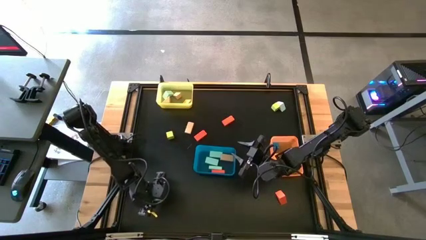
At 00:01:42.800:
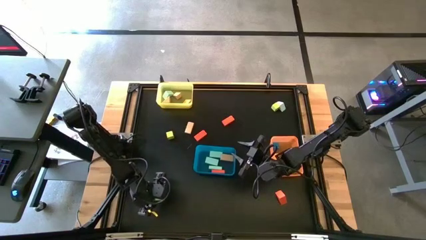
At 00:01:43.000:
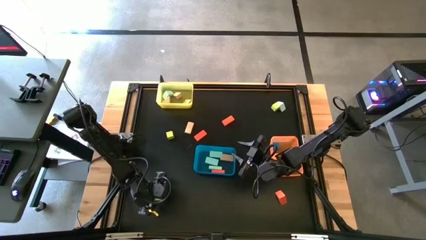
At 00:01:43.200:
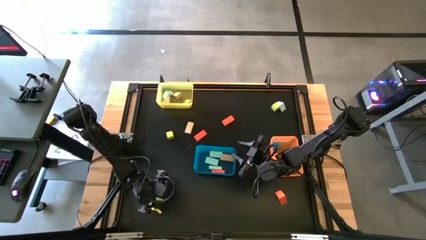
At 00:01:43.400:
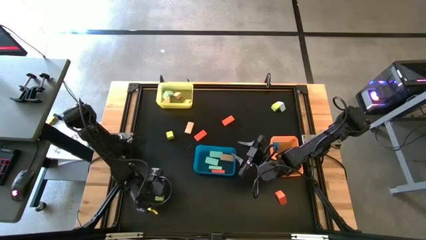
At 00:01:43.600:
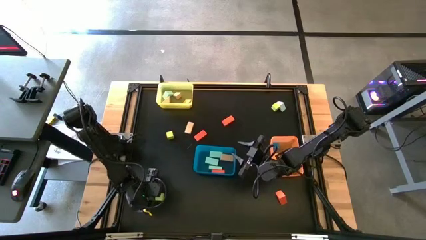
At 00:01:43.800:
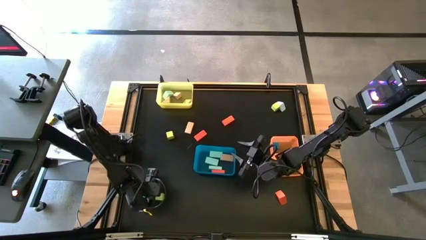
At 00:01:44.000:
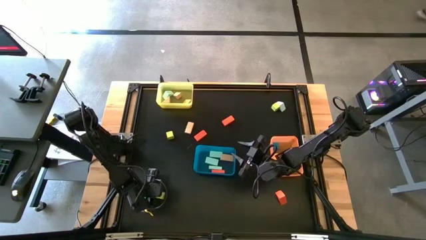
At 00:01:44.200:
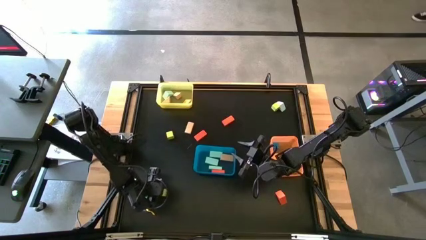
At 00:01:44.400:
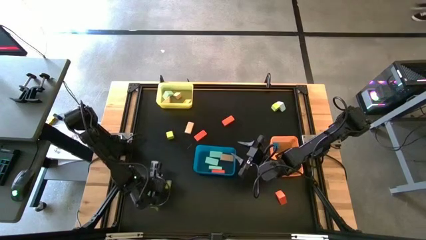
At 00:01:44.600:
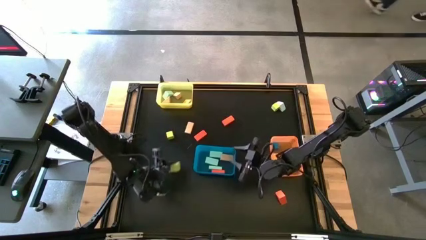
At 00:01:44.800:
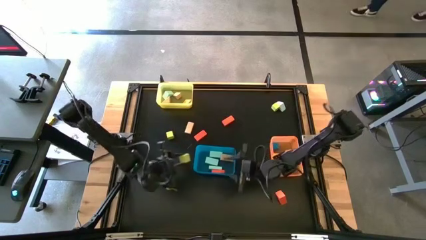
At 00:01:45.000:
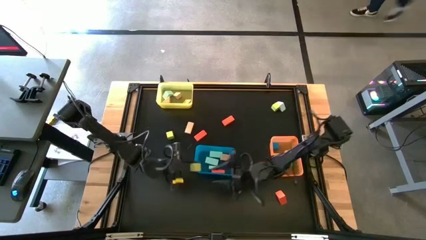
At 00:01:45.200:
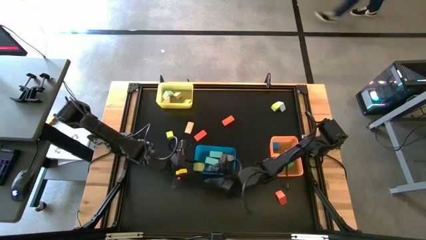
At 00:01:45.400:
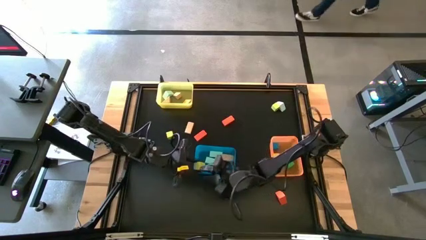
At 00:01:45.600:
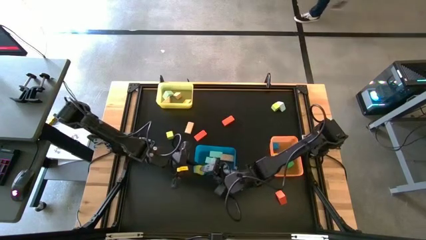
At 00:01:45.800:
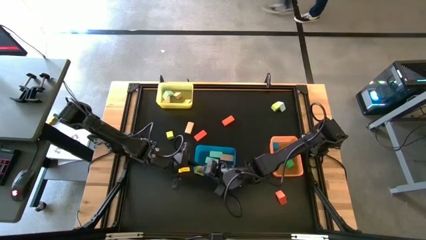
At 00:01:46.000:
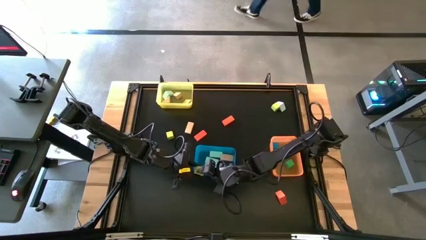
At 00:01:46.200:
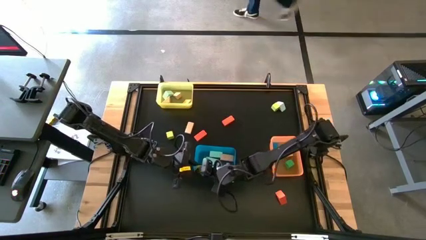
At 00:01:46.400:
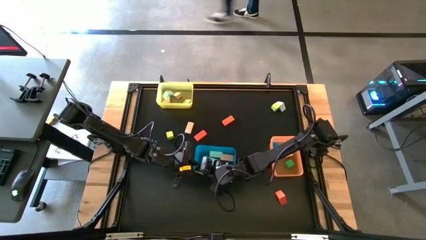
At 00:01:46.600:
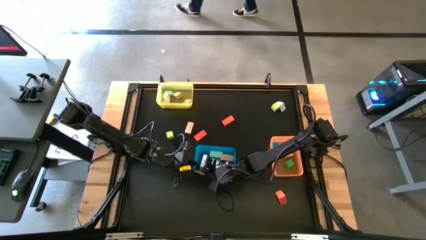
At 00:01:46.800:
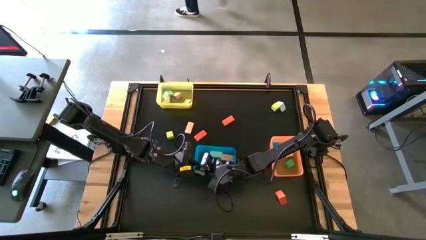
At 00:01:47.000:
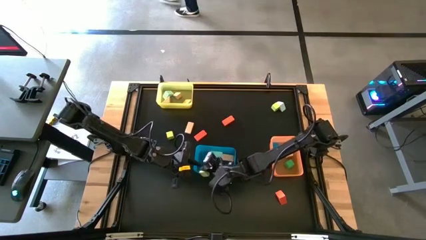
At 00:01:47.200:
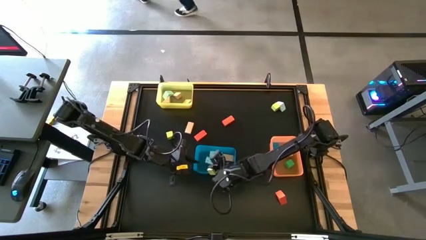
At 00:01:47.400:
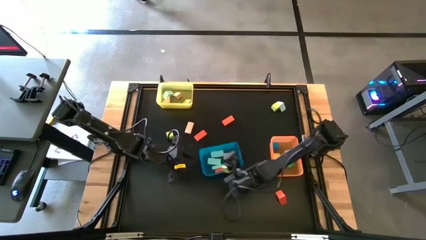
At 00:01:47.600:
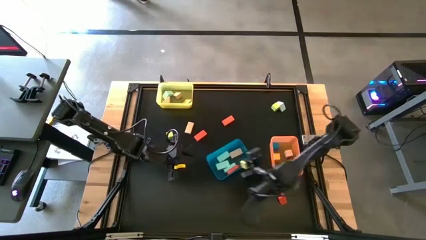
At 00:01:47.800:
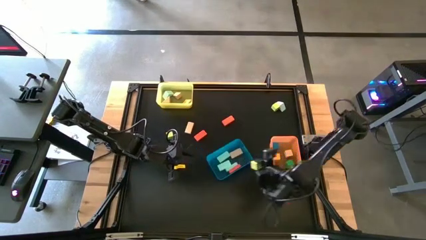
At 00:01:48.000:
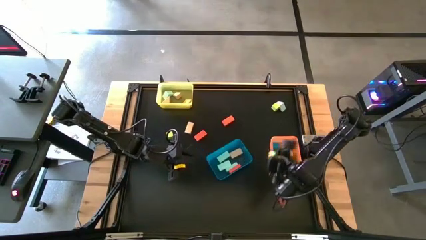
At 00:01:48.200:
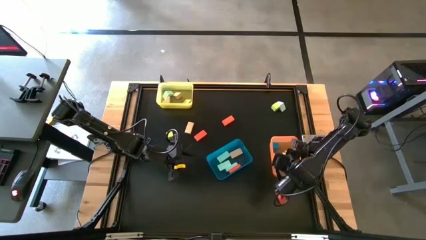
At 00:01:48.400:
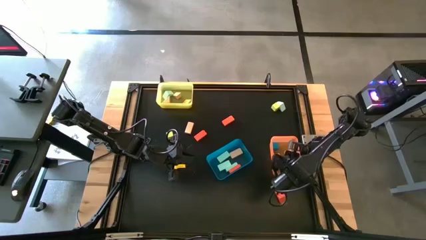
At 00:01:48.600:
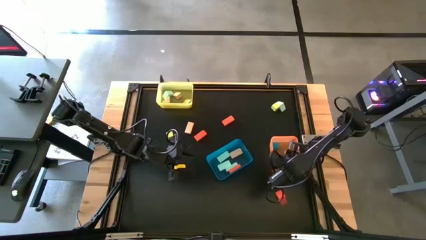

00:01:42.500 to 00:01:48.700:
Task: Sort blocks by size
Put the light green square block into the orange bin

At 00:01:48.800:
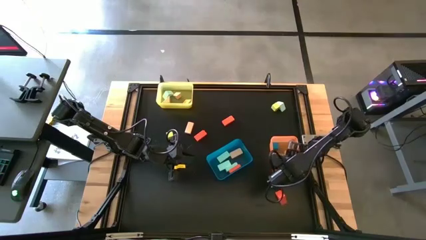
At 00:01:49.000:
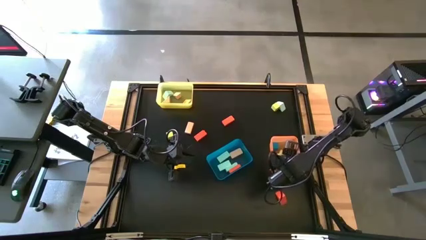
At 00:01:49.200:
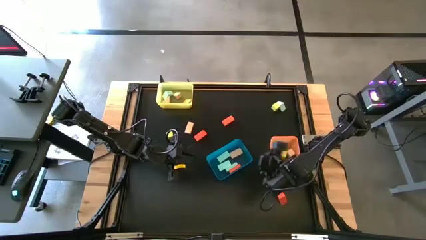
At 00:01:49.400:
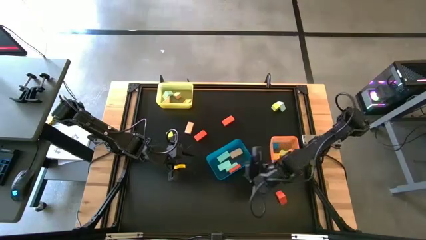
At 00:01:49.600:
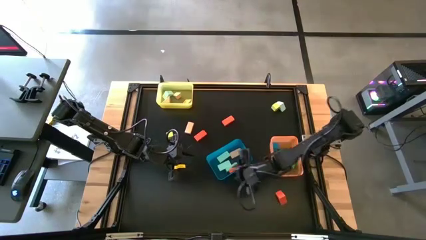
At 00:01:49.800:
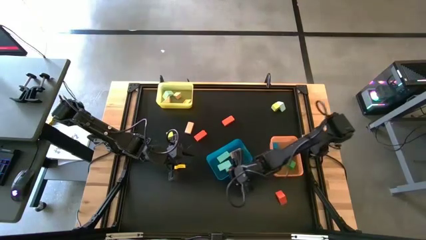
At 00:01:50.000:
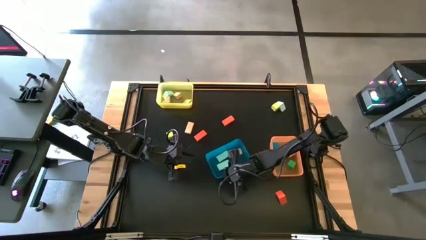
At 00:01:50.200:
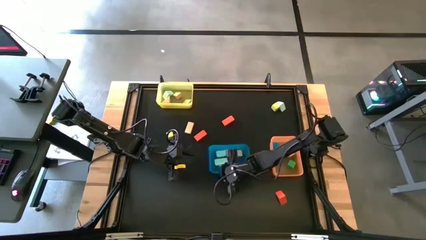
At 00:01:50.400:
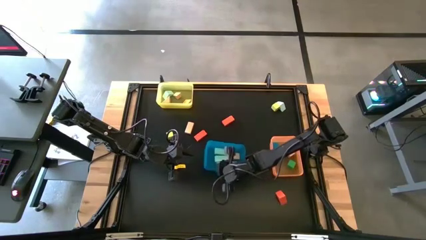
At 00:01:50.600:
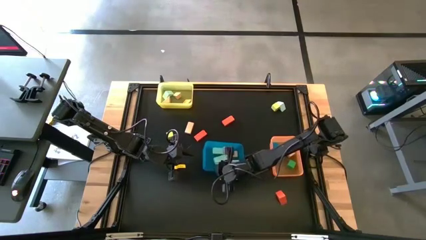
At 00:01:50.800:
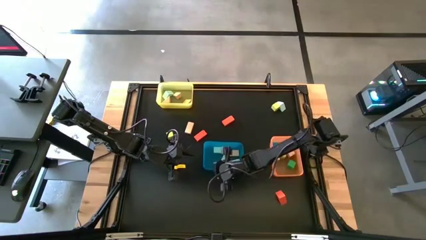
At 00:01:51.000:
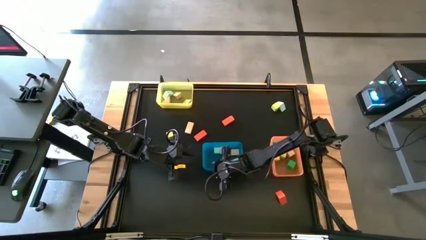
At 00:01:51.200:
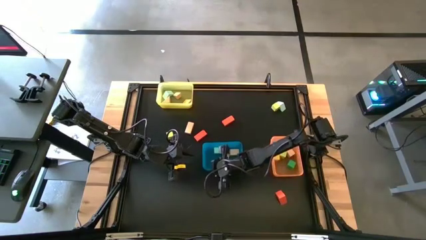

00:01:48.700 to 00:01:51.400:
Adjust the blue bin

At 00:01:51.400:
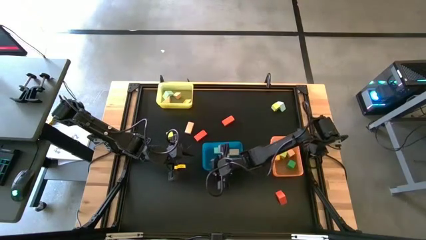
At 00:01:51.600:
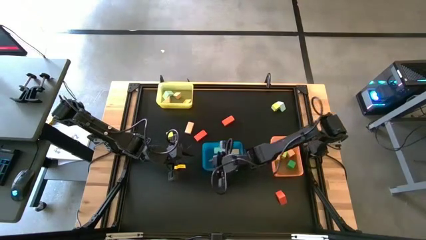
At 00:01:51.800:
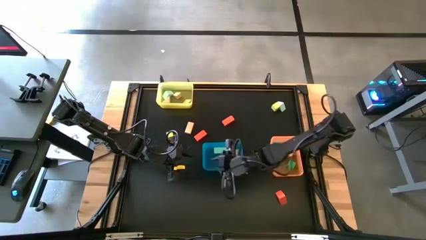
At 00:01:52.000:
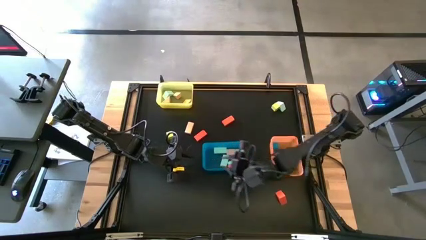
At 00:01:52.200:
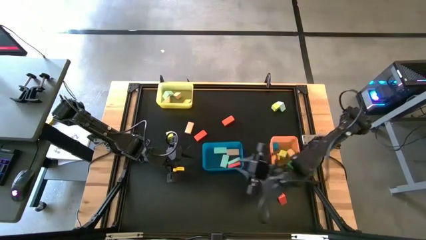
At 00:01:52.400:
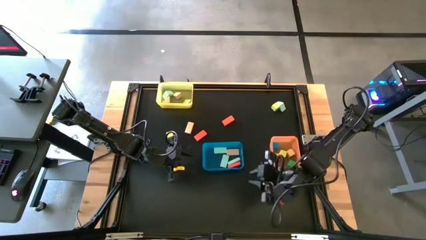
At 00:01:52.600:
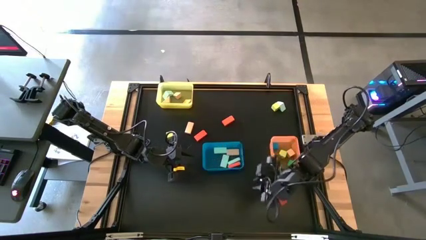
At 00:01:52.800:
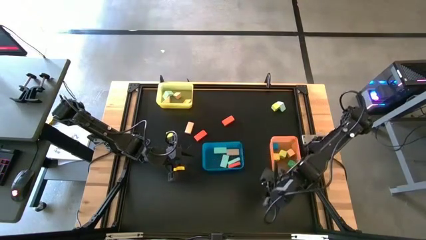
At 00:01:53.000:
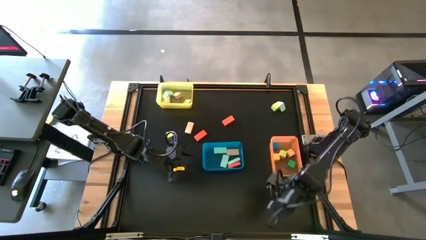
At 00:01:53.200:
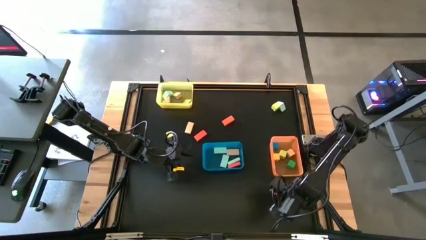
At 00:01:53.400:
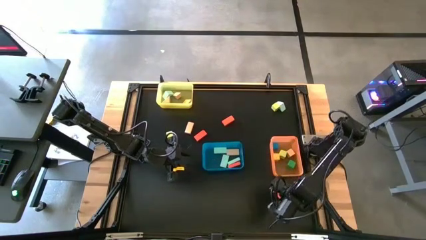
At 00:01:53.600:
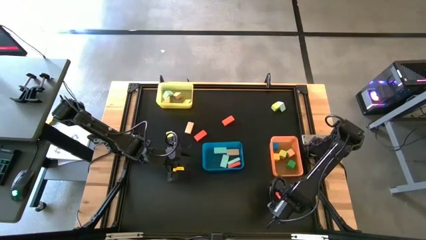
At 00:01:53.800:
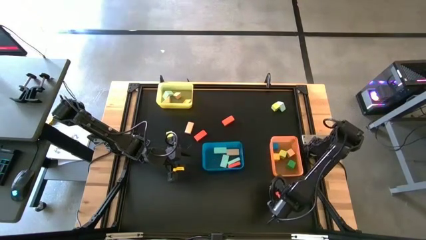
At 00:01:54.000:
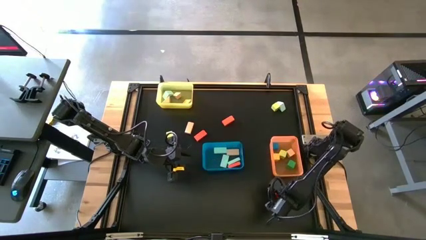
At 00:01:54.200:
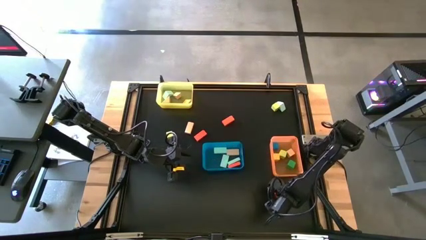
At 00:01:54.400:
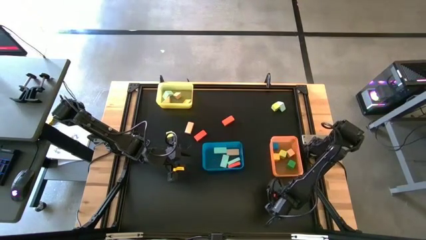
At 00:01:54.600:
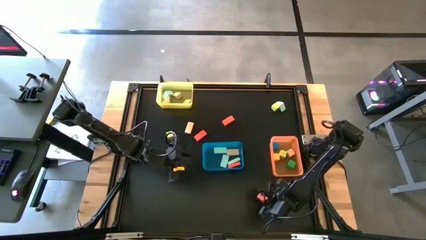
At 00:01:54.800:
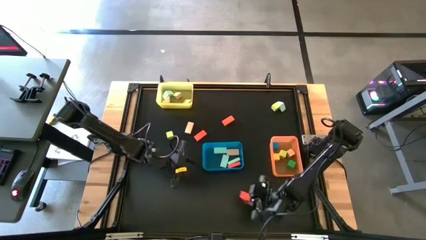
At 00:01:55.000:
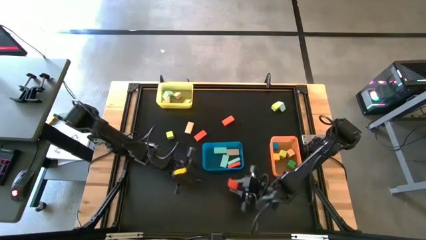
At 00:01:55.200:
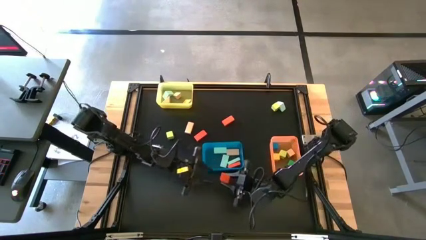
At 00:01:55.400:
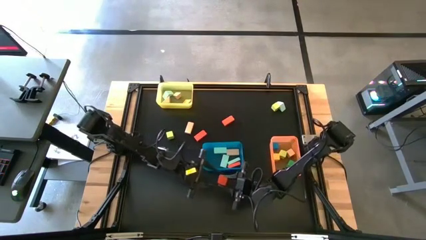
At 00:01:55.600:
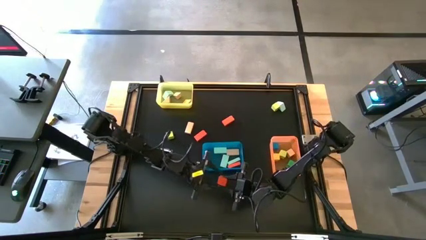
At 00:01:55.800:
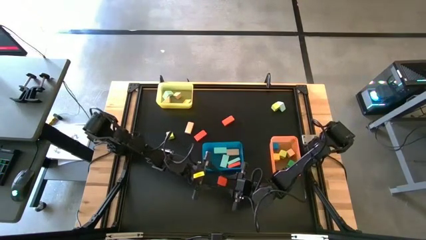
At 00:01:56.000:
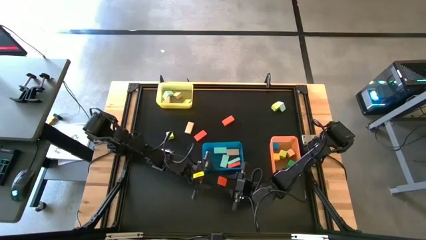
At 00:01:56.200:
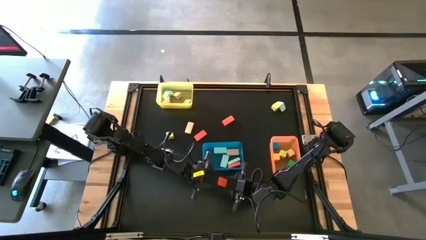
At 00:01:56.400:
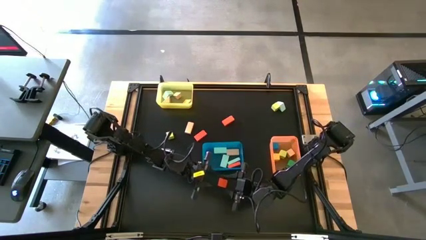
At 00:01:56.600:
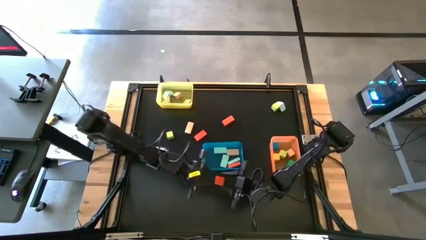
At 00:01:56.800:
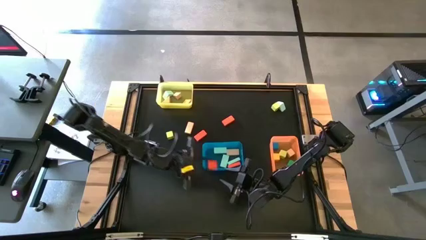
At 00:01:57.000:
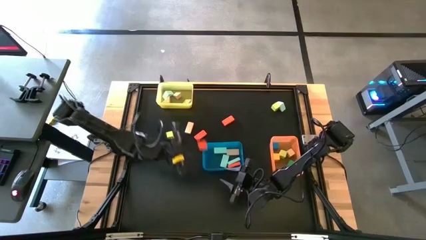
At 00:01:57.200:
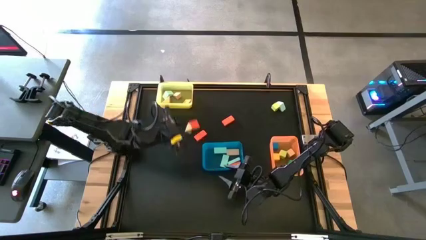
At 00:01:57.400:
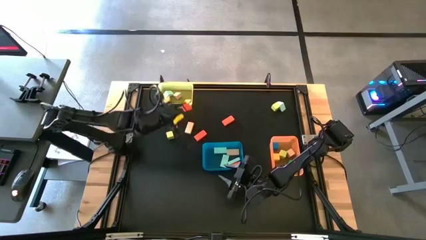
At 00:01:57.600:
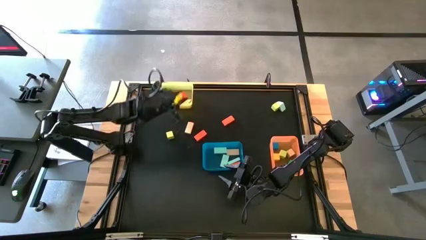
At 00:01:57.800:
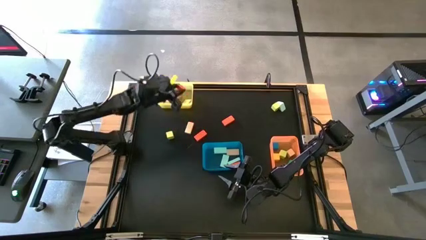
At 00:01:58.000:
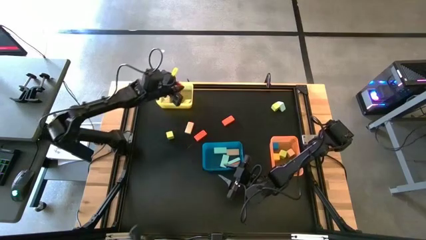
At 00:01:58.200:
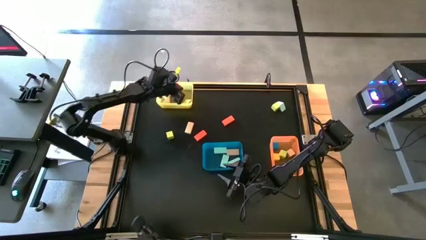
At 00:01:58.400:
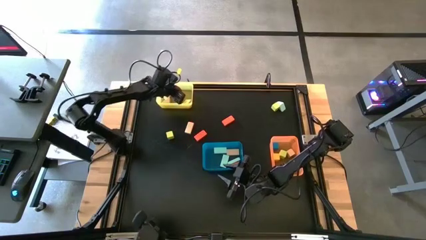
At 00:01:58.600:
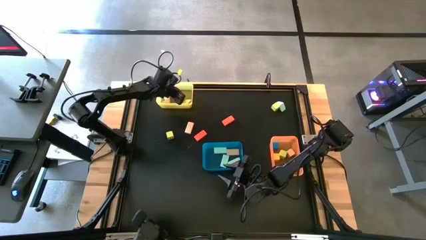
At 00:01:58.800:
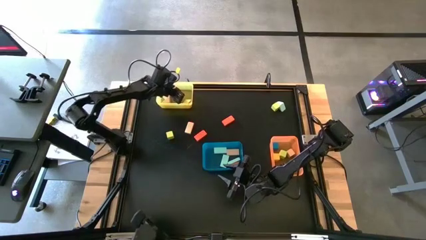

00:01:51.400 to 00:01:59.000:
Put the orange triangular block into the yellow bin
